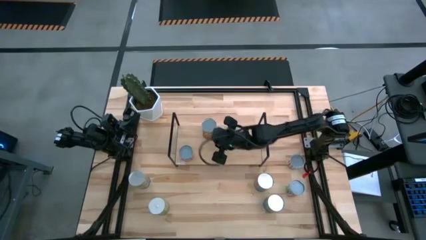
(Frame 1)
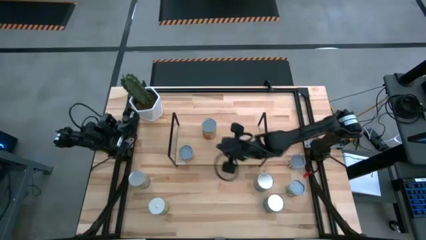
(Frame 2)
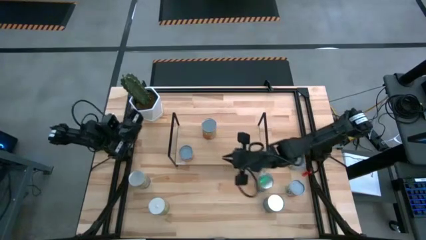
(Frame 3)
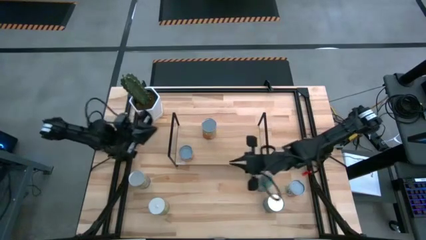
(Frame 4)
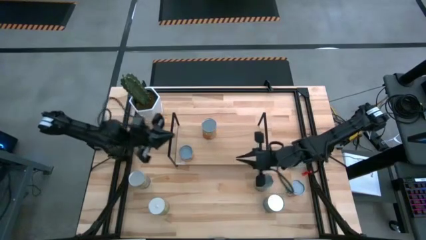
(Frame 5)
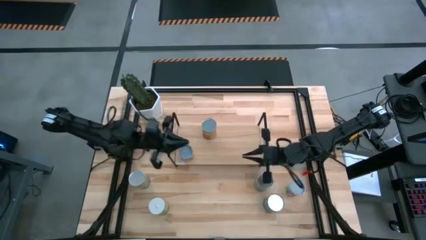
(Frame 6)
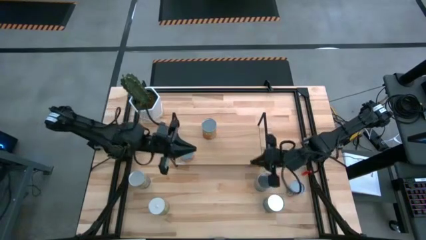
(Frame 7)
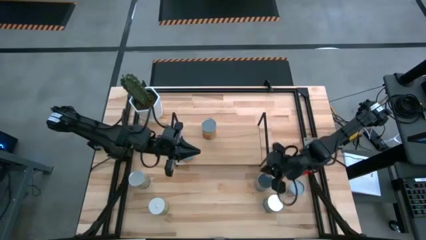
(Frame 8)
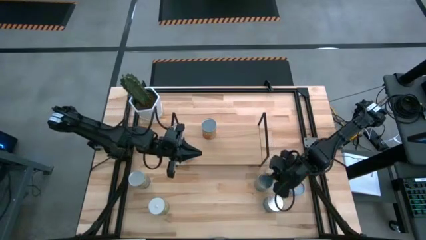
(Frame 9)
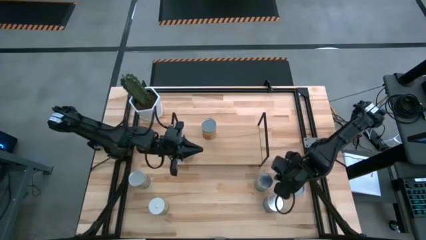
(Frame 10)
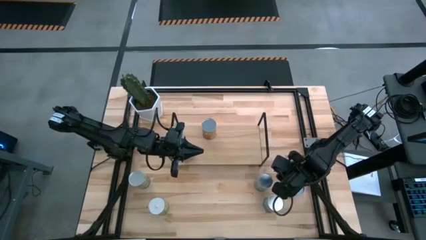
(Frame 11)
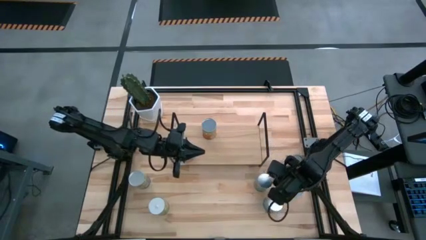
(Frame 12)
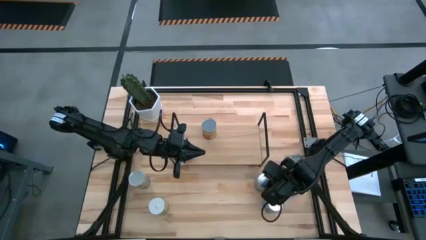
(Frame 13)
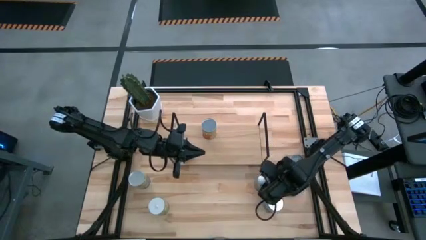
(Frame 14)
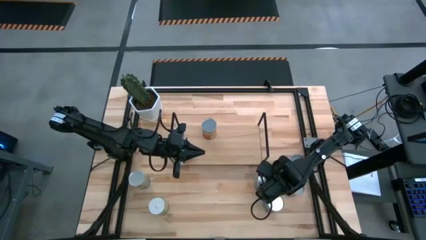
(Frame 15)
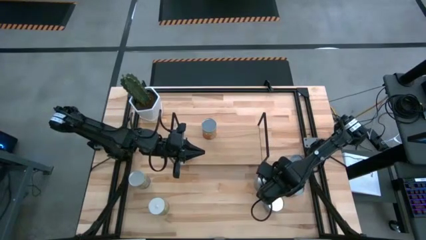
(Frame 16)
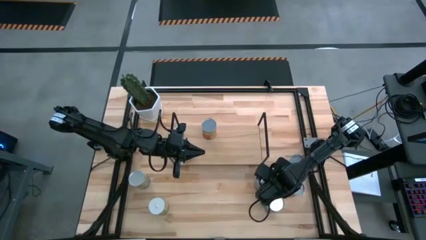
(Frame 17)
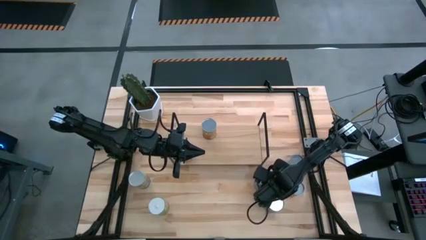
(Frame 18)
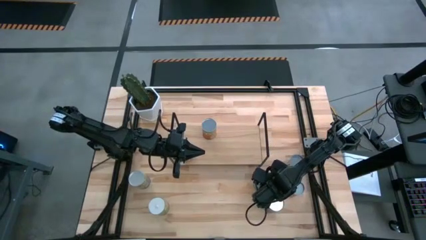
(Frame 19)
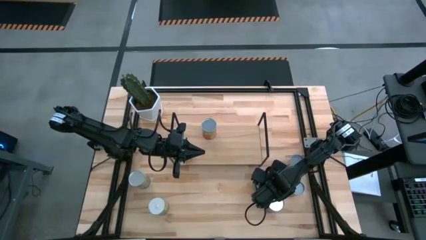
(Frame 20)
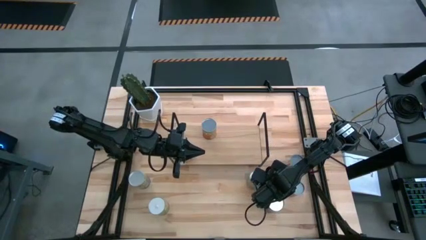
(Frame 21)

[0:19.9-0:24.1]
Task: Pick and place cans onto a shelf
Put the canned tomatoes on the shelf

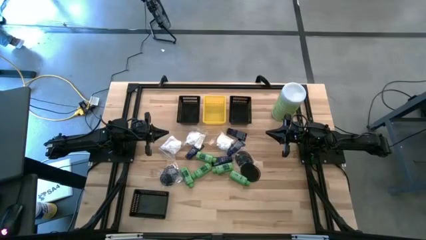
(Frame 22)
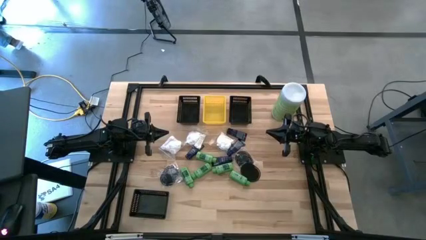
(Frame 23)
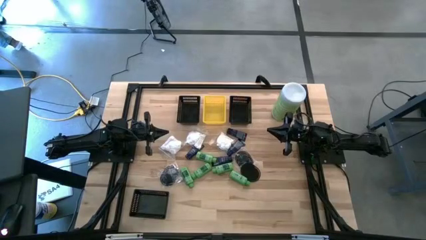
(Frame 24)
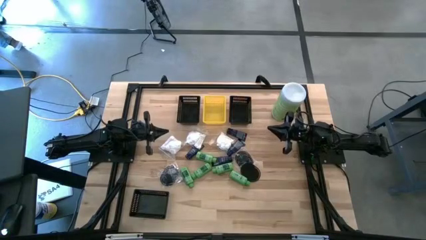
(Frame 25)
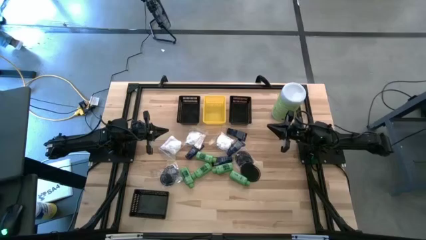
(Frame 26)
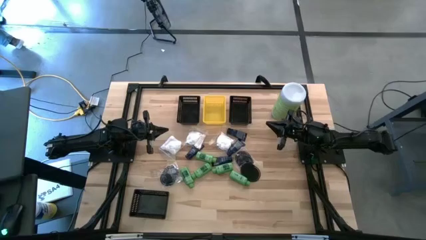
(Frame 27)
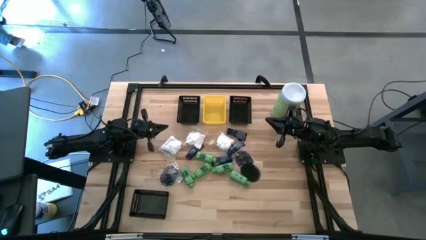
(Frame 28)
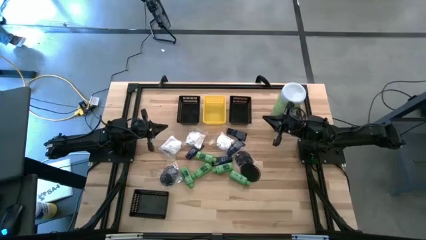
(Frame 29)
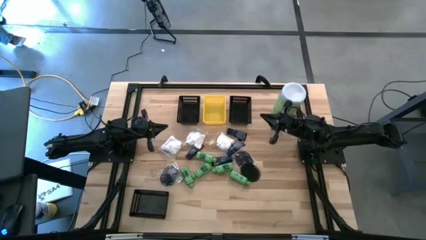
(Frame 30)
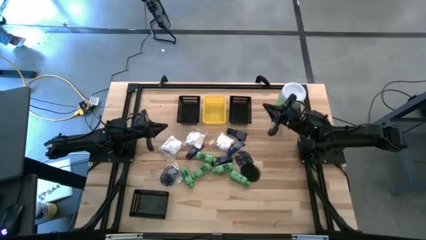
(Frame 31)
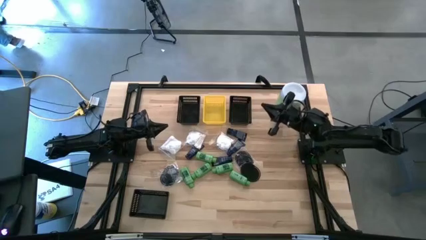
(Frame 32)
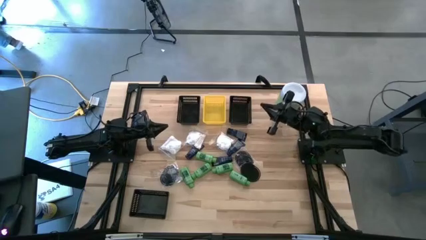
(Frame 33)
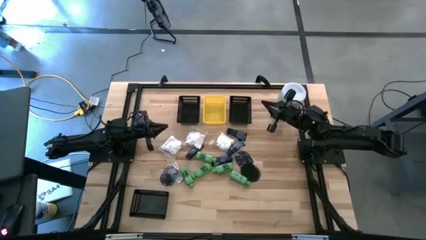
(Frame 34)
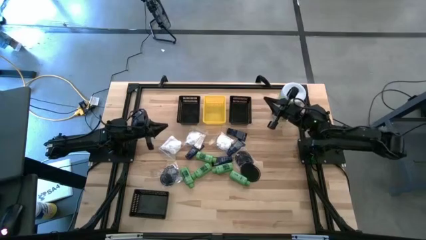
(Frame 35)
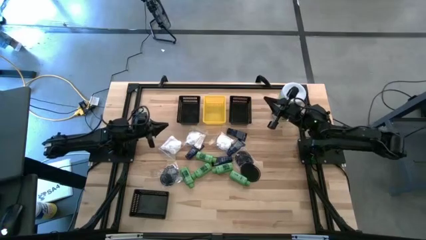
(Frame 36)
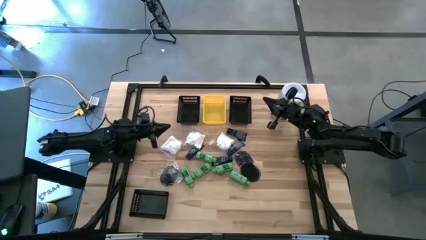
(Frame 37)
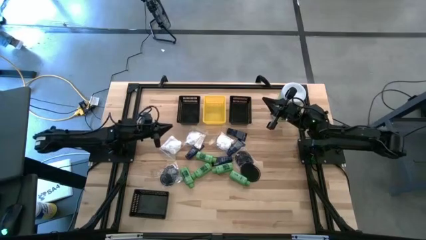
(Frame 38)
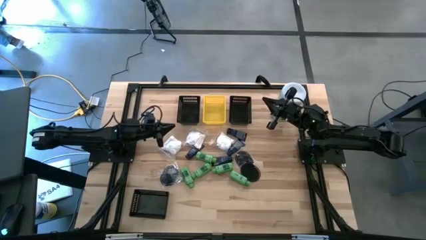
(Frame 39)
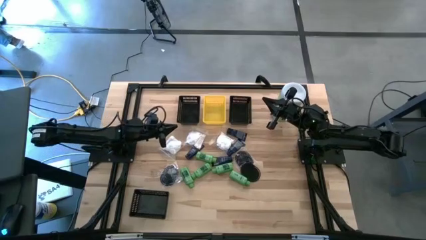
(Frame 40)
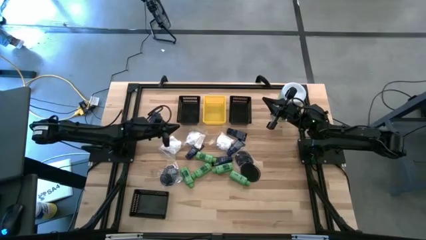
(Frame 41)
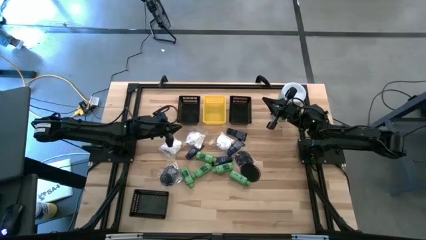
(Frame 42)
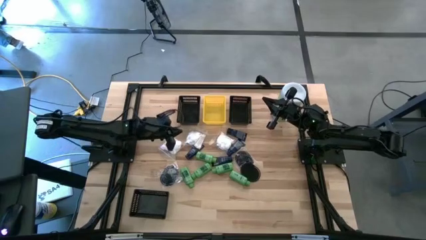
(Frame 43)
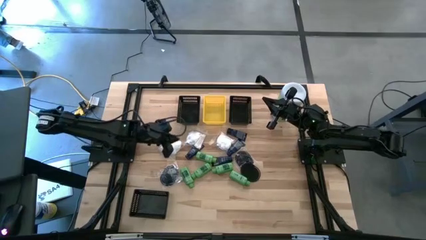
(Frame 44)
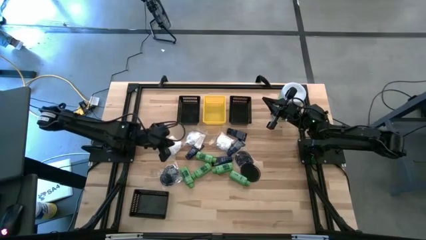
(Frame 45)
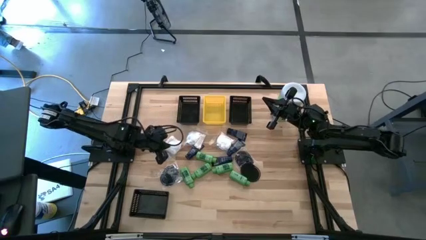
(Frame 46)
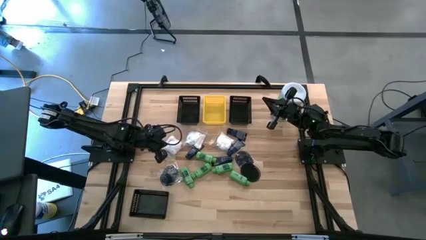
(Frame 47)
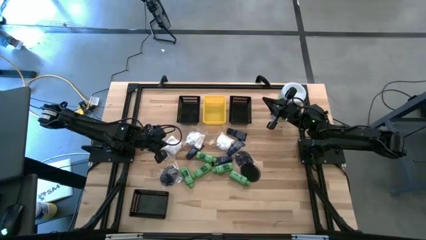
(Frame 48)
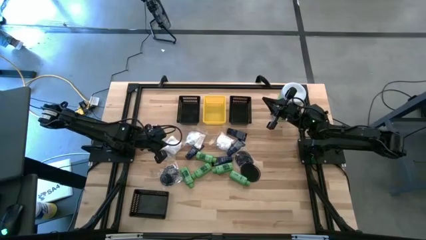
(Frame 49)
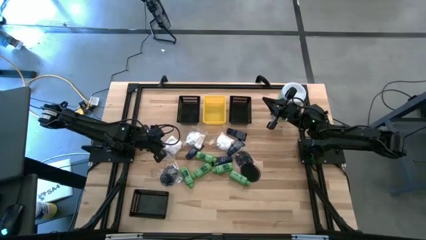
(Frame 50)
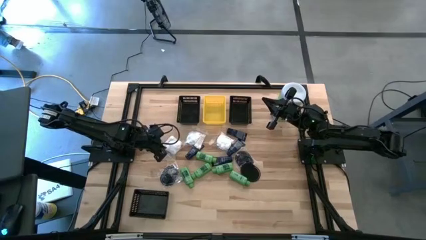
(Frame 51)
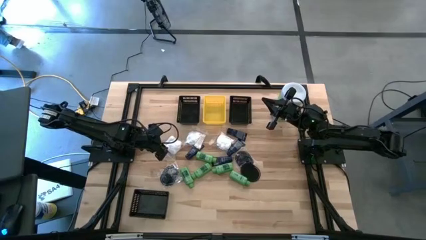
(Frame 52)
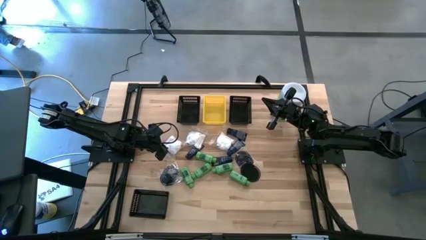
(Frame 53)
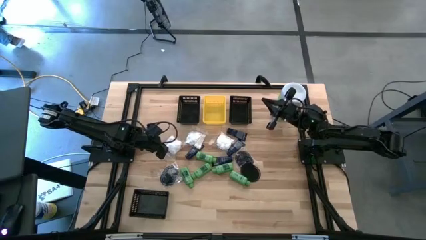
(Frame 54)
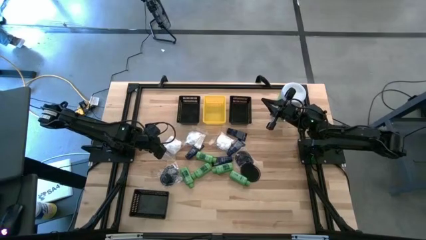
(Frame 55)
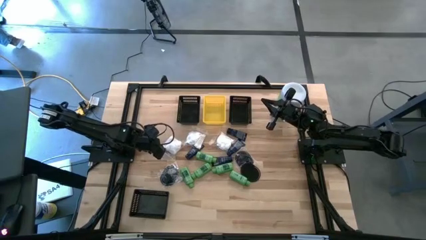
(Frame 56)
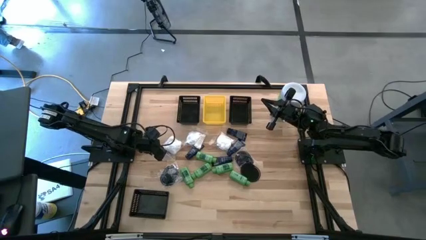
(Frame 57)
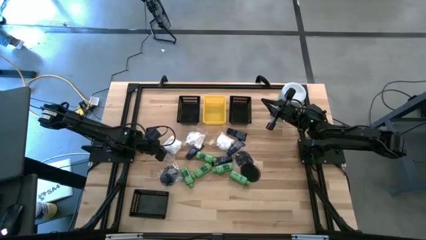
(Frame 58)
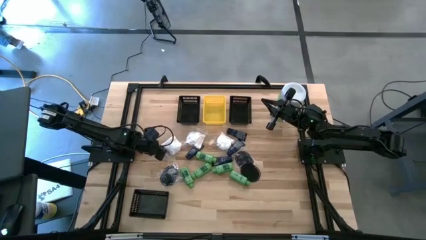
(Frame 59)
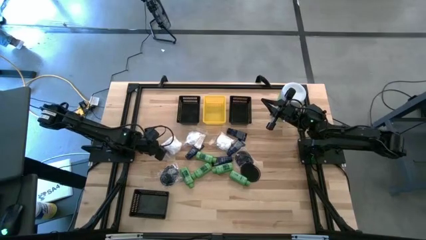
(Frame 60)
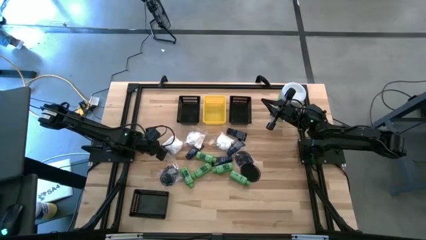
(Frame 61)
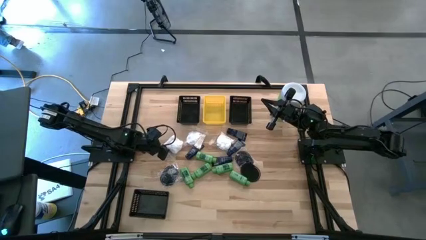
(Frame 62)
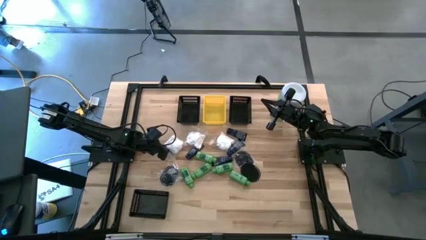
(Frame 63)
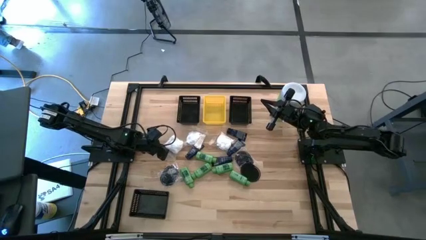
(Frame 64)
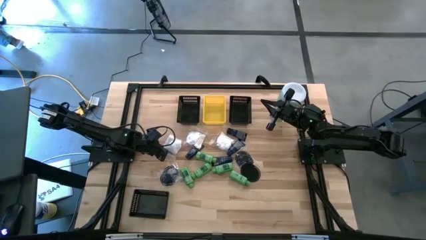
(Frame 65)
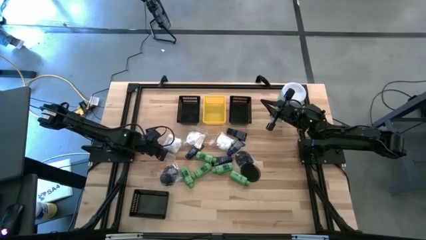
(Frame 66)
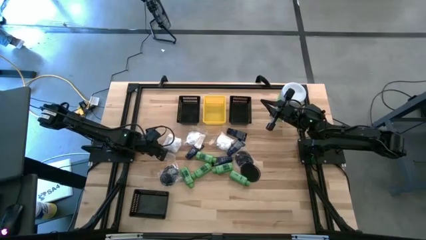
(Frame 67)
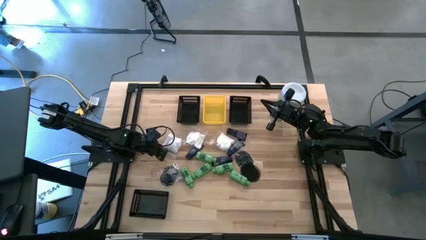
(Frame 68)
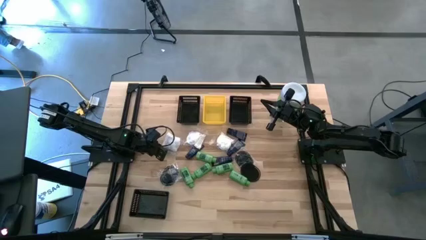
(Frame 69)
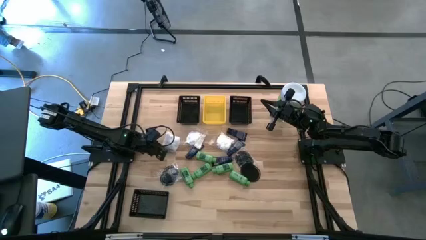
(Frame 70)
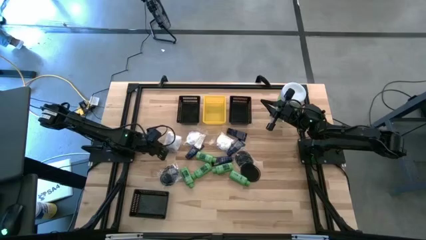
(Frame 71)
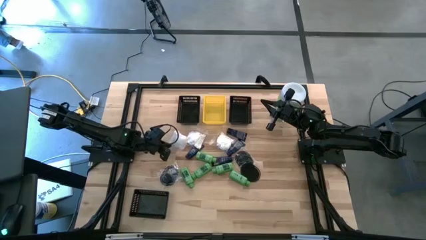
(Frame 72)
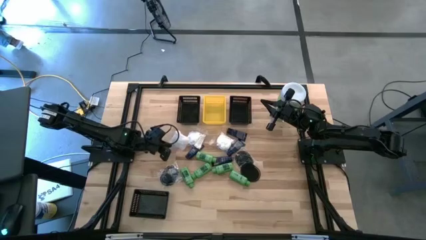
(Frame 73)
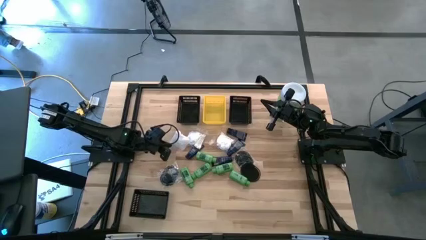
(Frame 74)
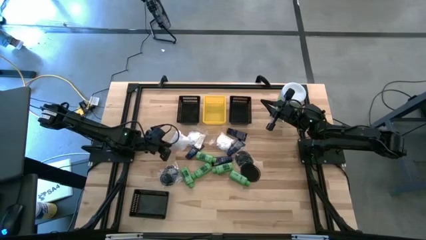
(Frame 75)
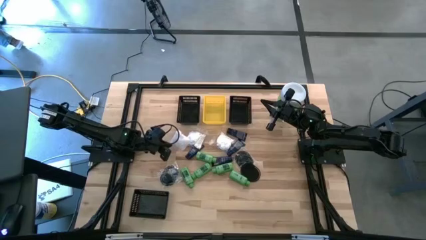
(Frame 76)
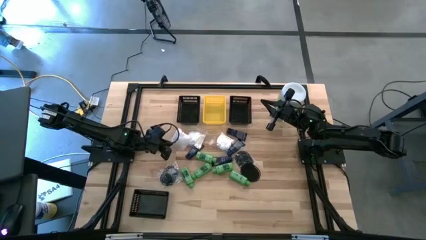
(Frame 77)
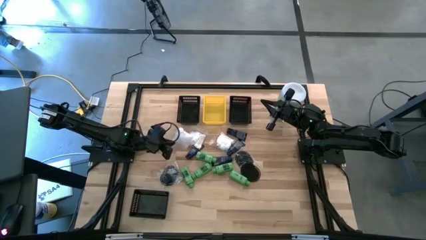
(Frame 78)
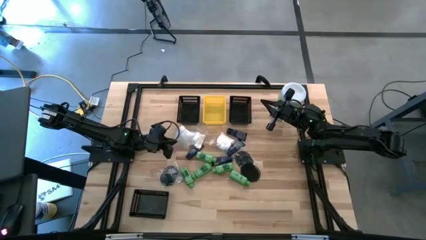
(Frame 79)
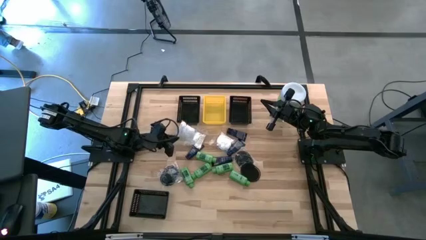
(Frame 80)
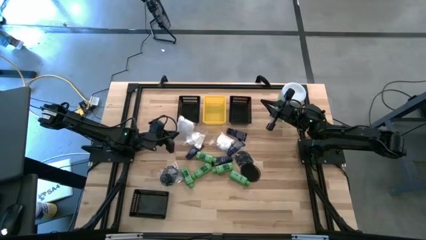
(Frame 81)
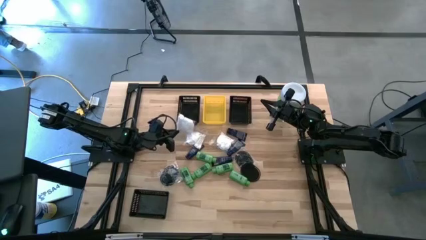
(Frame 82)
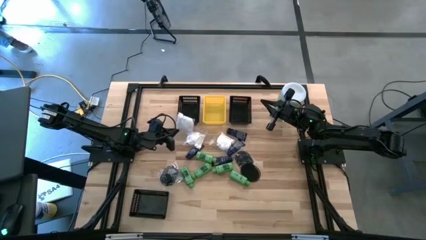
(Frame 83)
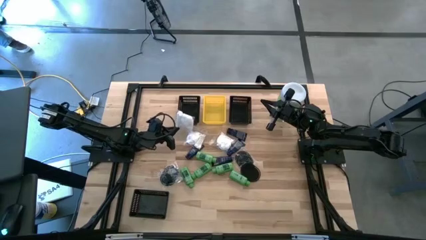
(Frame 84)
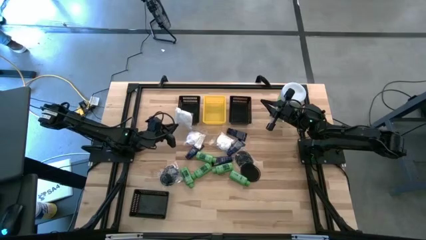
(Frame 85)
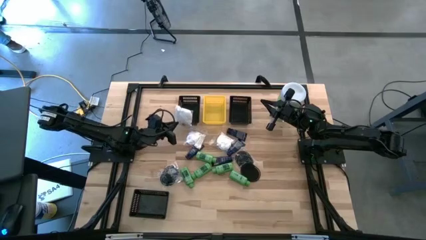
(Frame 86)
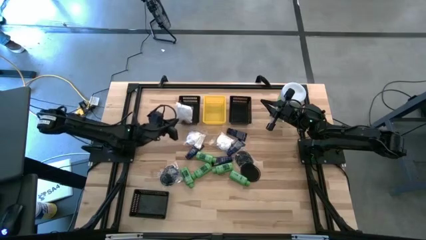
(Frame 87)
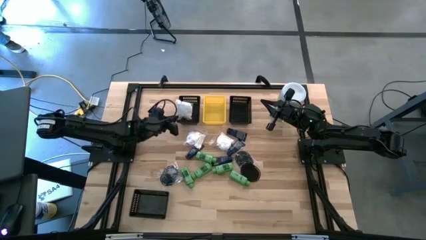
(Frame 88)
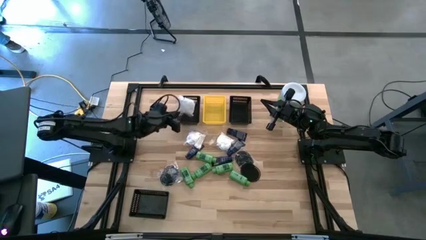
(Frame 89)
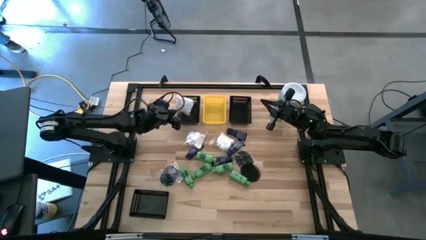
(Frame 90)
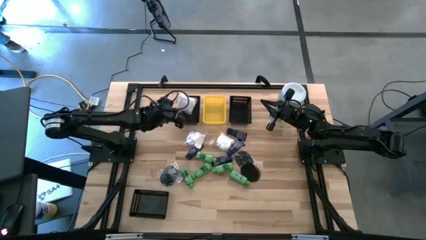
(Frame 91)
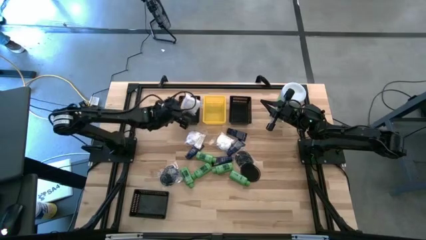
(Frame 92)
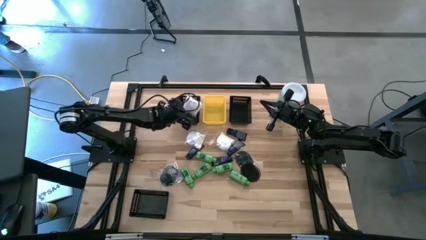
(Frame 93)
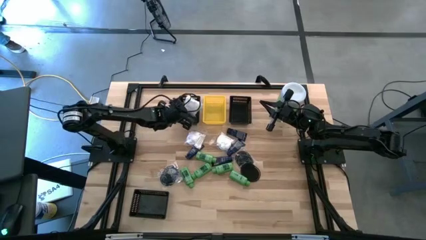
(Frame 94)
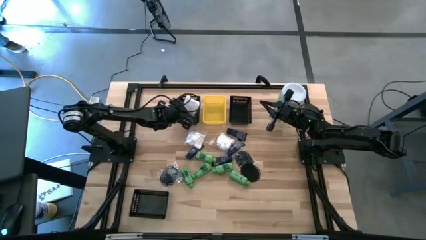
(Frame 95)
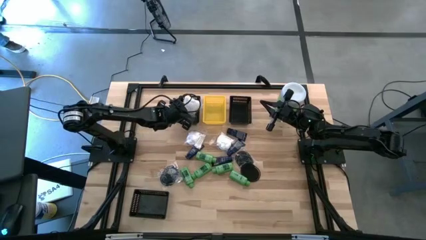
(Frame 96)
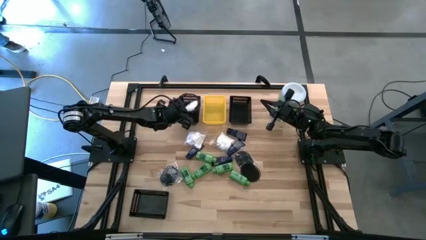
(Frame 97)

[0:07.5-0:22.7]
Task: Pick & Place Travel size toiletries
Put the cotton pack into the top left black bin
